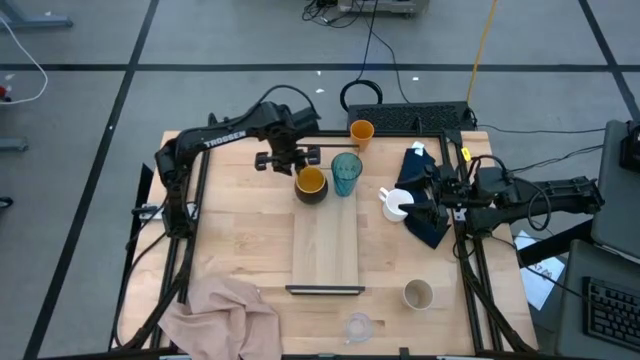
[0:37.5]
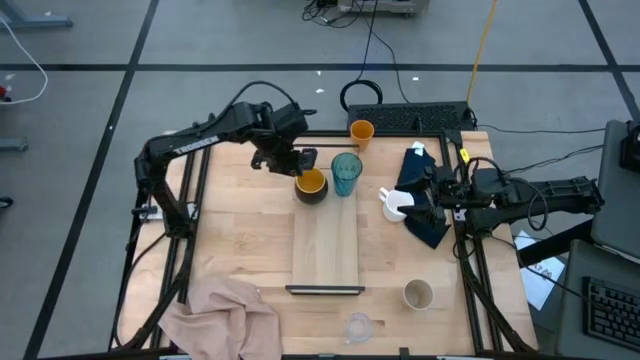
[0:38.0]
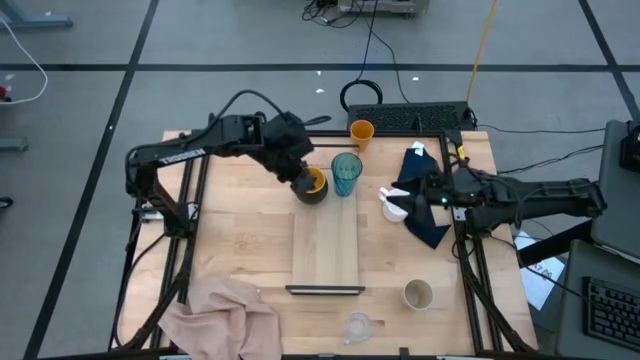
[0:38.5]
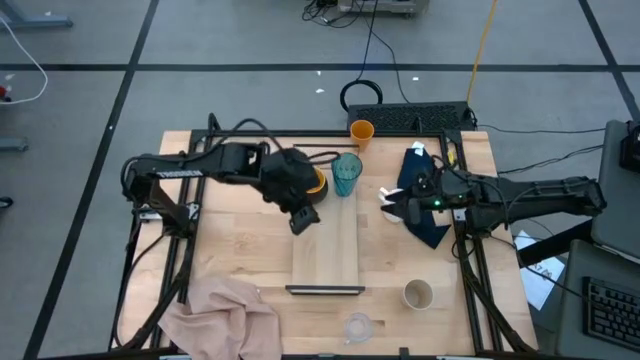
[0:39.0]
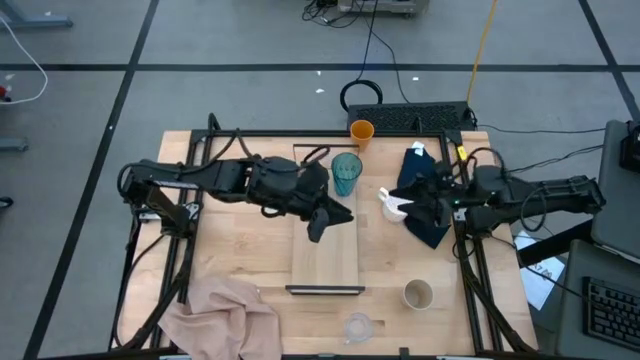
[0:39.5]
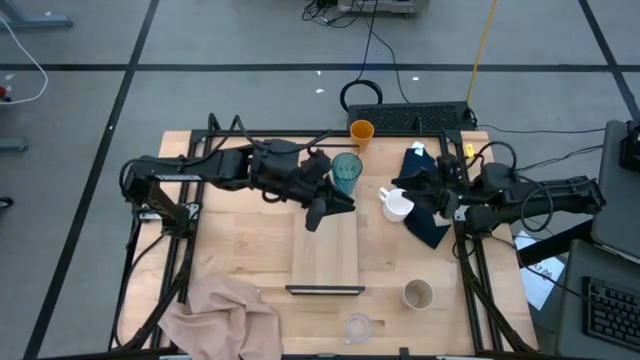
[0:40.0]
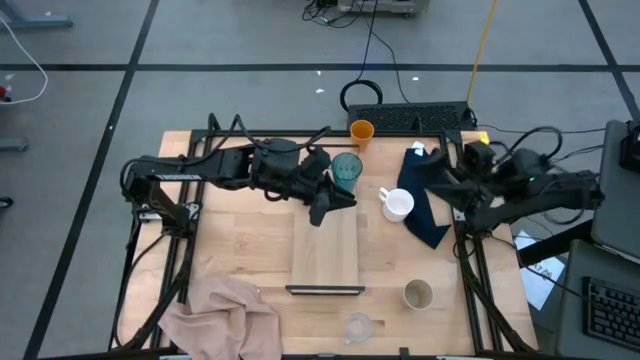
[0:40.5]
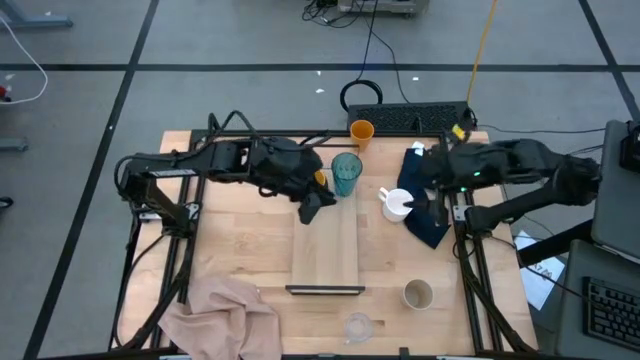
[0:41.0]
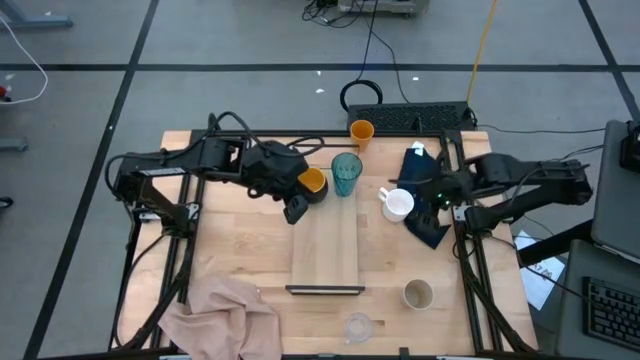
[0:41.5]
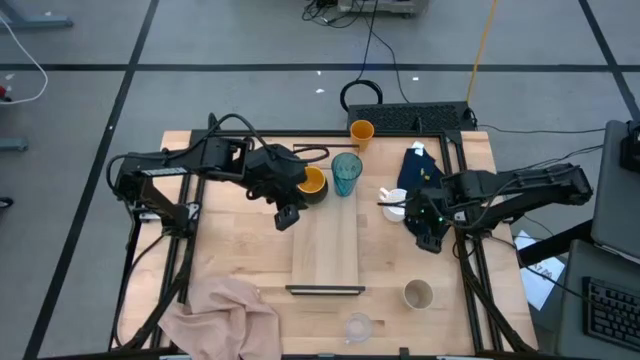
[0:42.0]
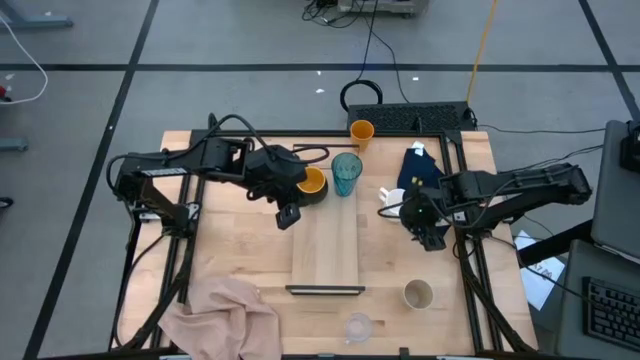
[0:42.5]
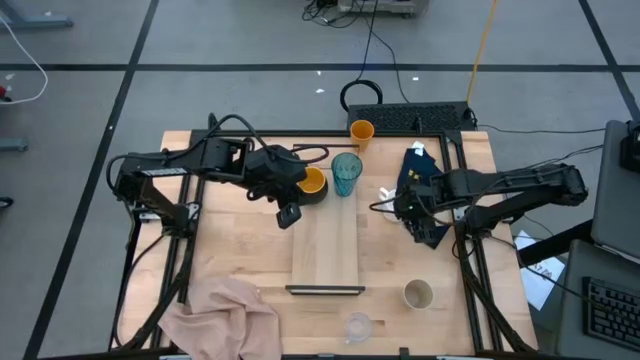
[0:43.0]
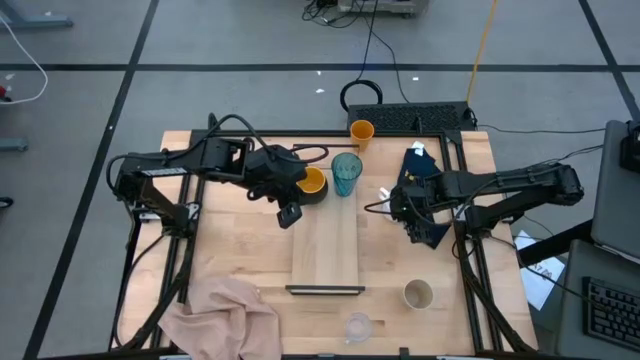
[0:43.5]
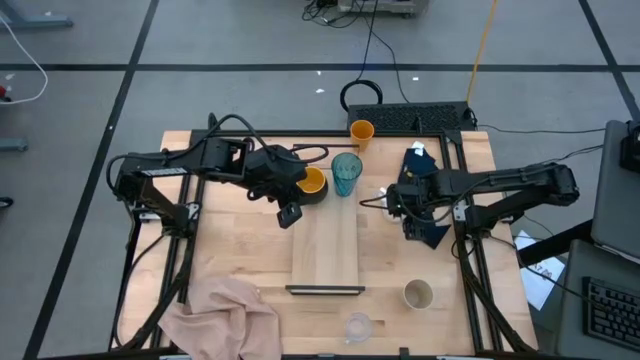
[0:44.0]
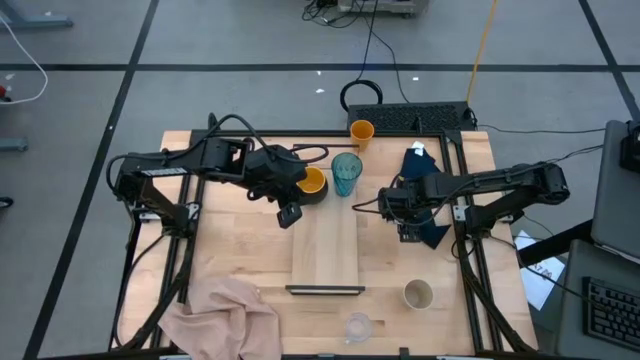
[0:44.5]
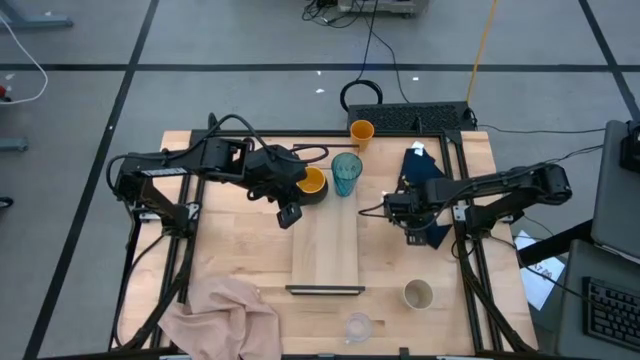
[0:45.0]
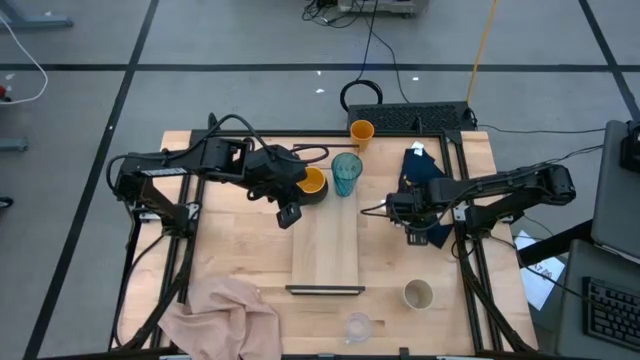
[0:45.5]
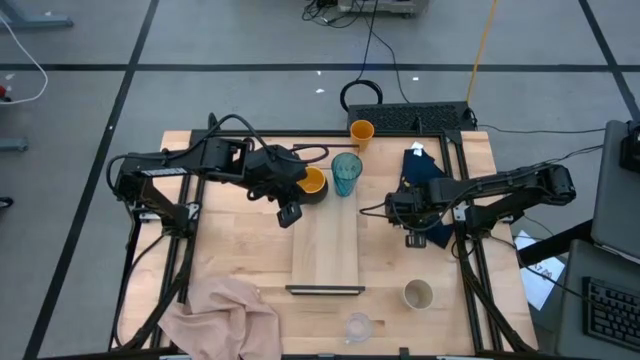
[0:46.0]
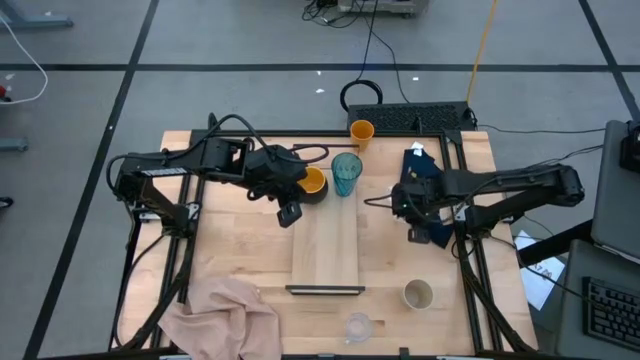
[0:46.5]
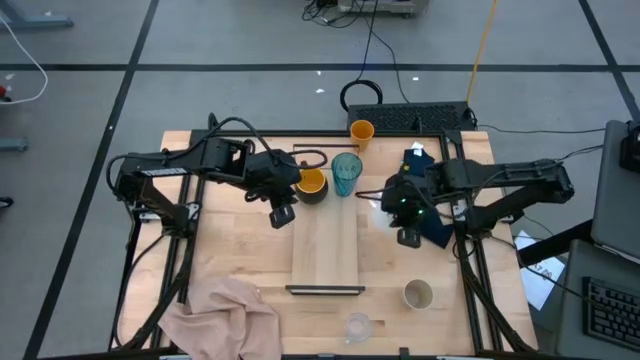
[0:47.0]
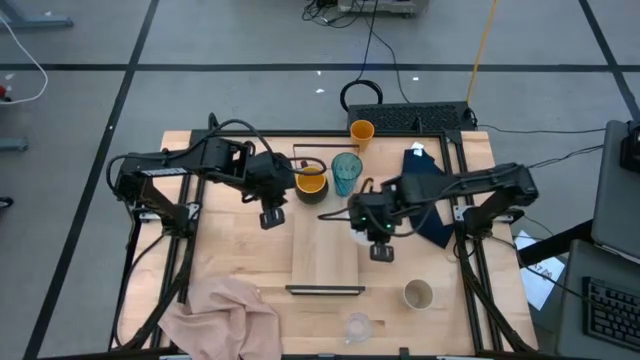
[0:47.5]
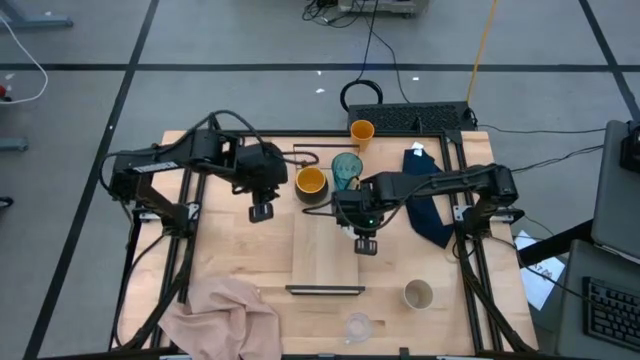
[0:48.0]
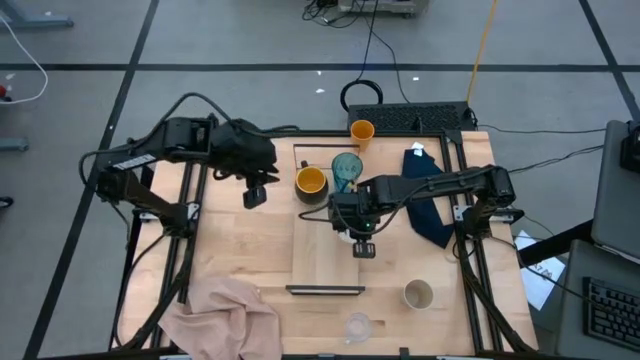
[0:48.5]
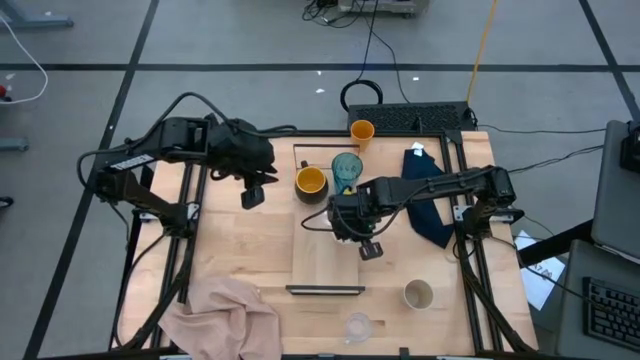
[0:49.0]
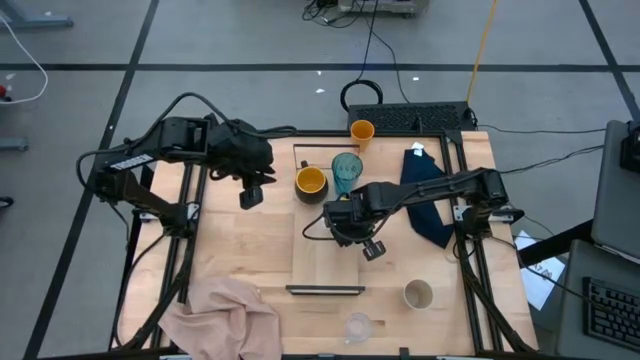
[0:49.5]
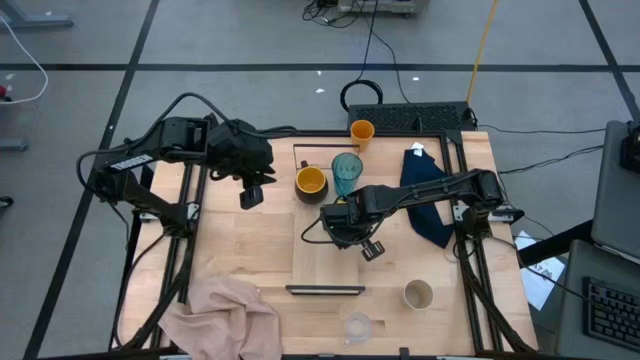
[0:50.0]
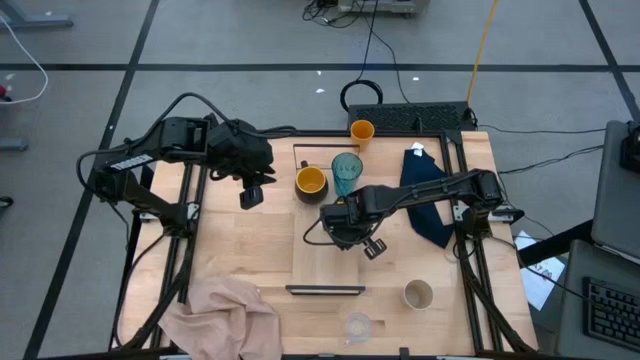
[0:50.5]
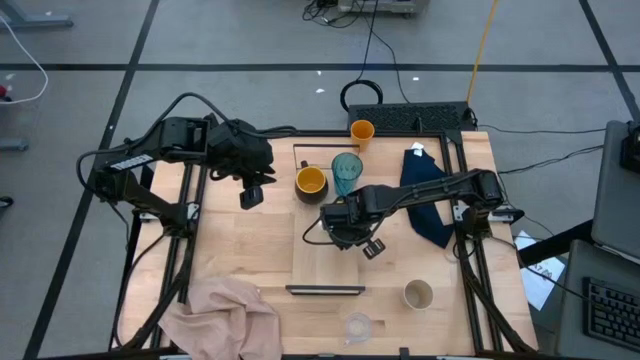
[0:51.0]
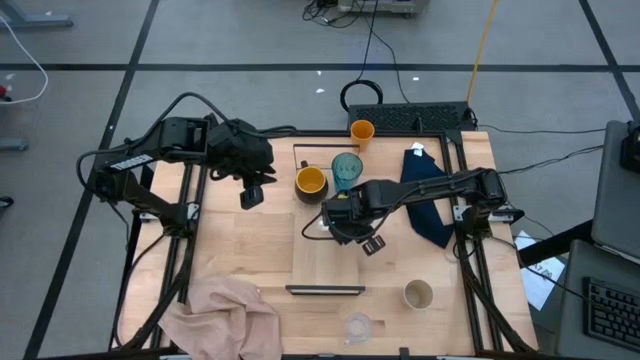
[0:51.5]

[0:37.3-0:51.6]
Task: Stack small to large cups/mugs on shelf
Put the white mug on the shelf

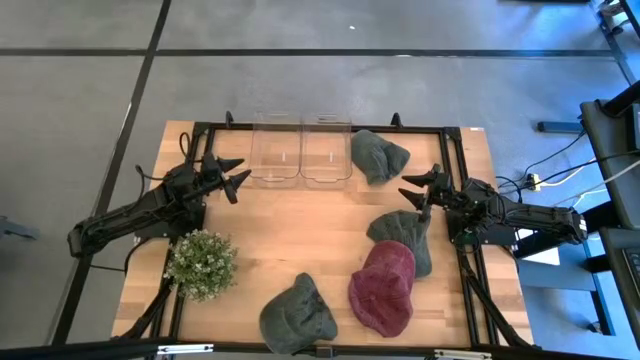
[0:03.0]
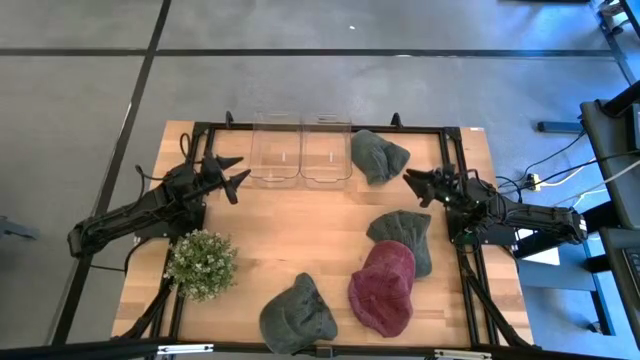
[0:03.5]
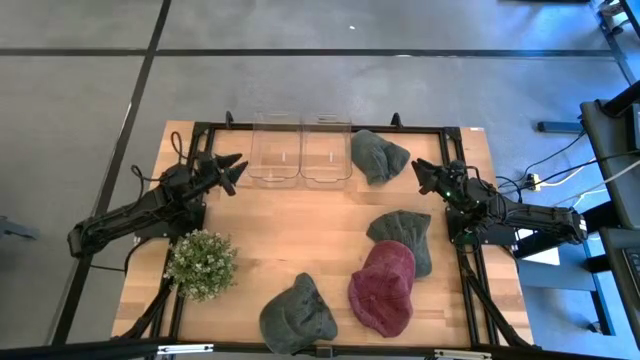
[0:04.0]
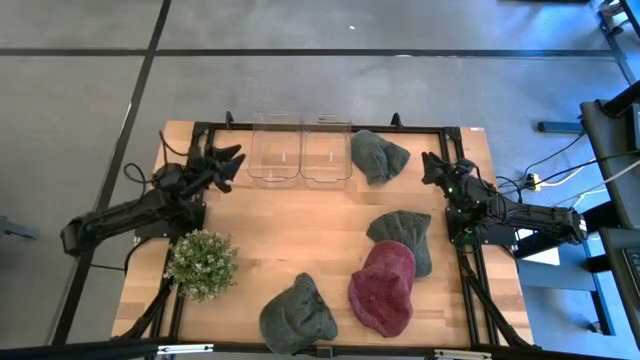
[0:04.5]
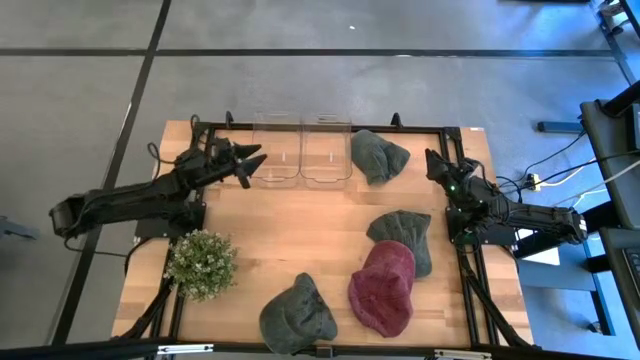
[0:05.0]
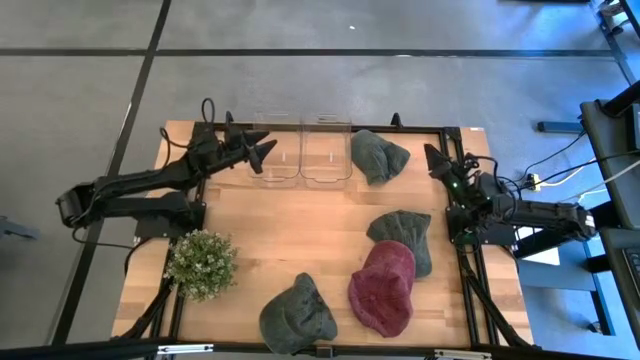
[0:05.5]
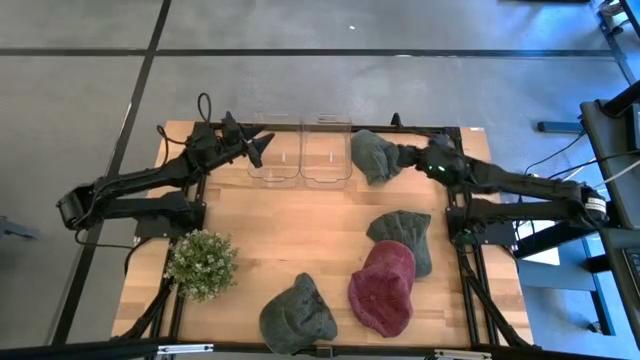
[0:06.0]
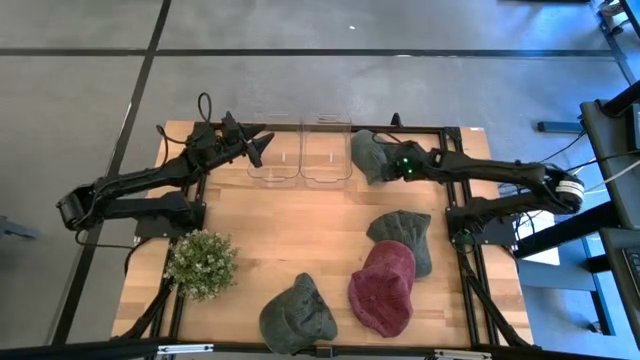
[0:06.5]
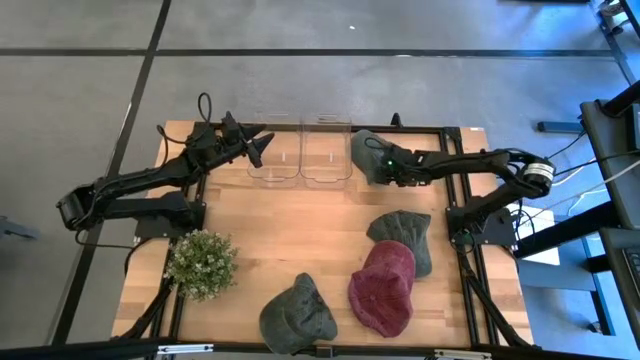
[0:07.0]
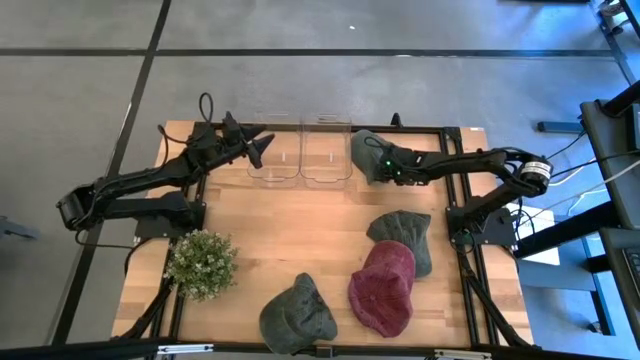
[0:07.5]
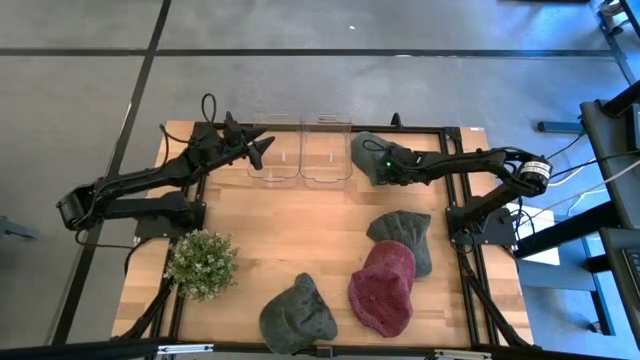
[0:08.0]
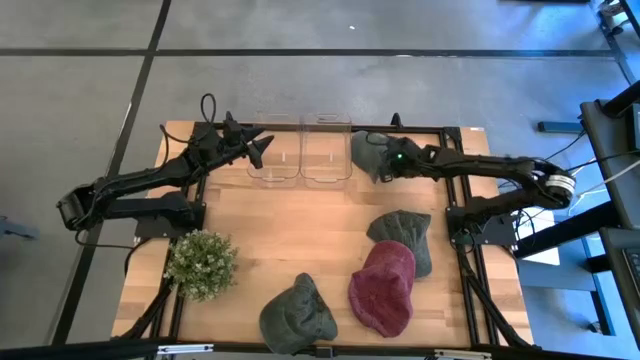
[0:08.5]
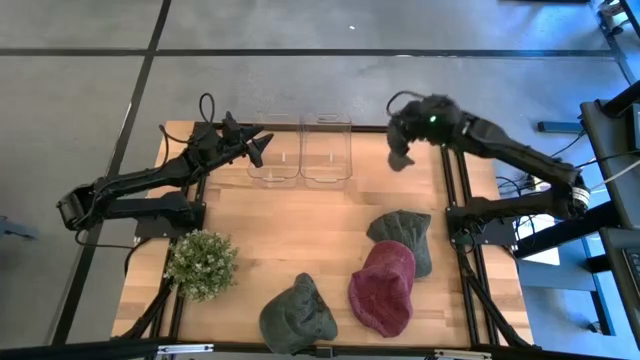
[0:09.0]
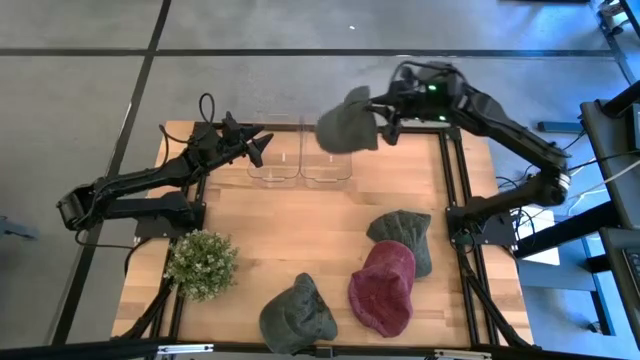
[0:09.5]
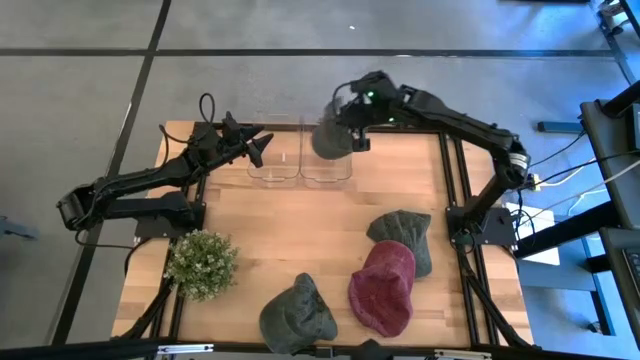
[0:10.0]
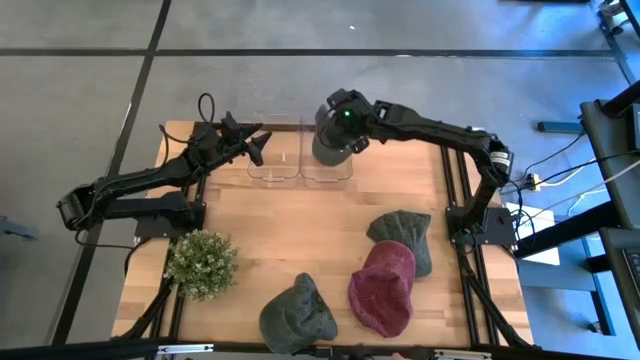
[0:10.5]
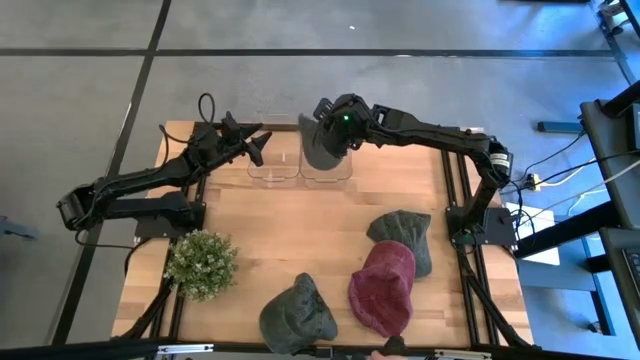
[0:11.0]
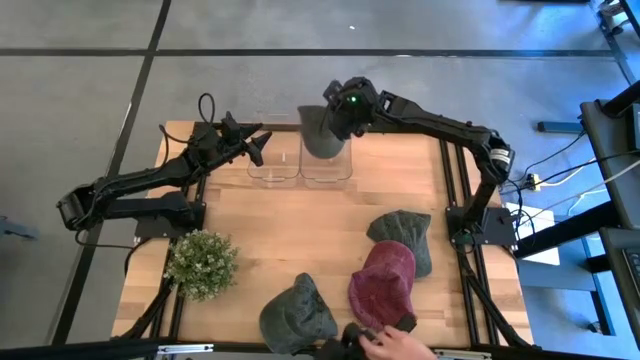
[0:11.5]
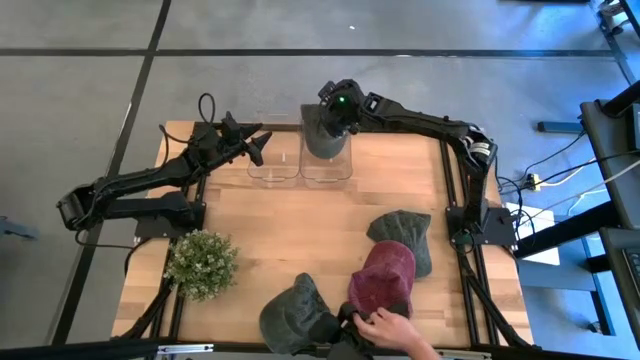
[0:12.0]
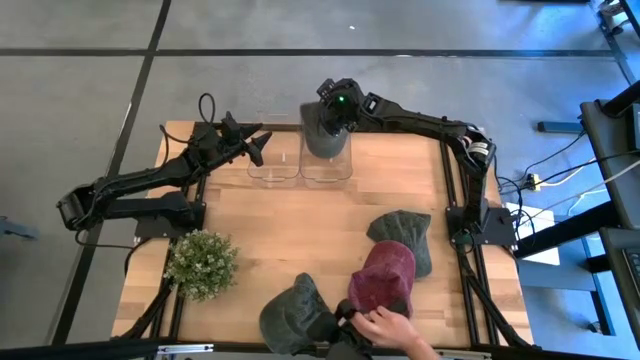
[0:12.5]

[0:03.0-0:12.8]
Task: Pick & Place hat
Put the top black cap into the right transparent bin
